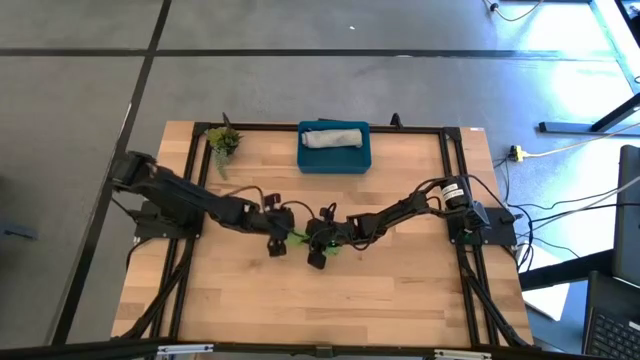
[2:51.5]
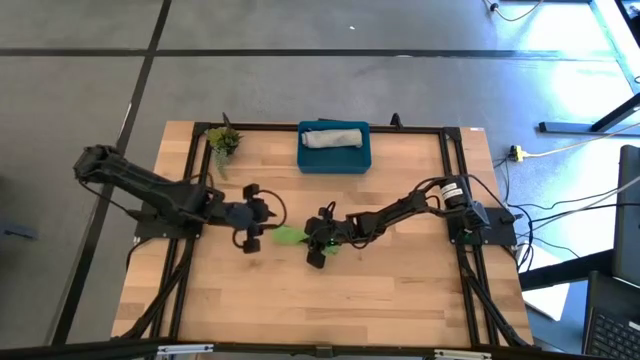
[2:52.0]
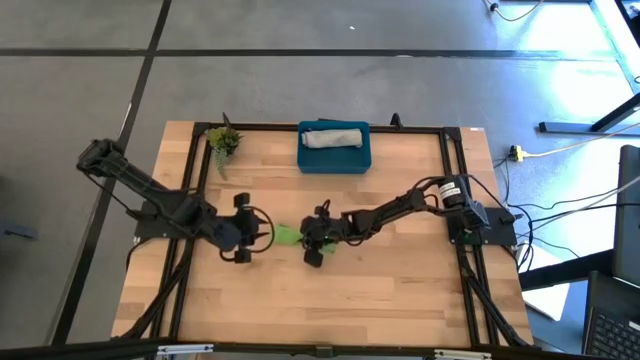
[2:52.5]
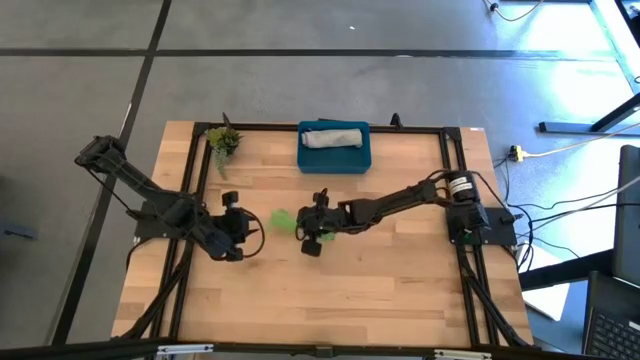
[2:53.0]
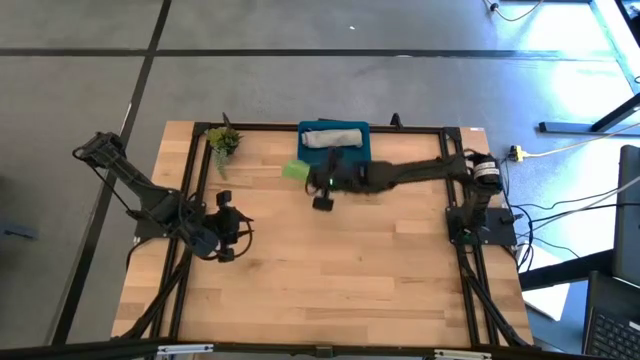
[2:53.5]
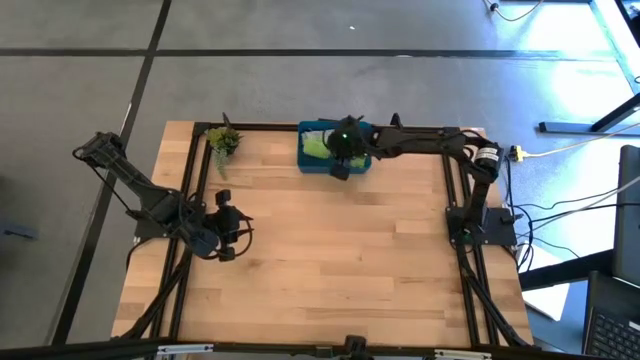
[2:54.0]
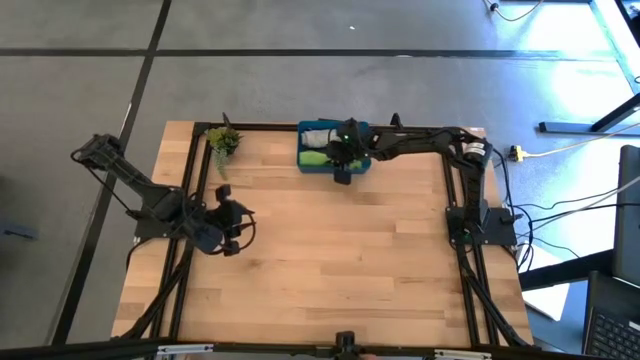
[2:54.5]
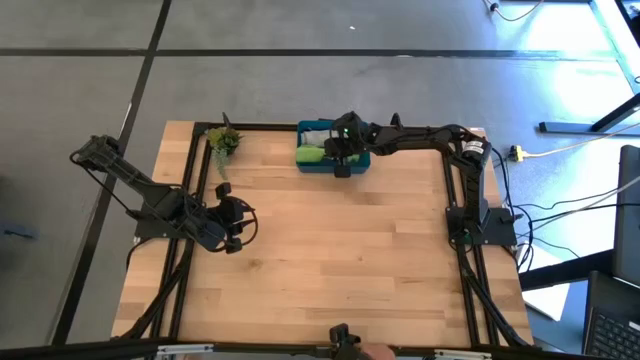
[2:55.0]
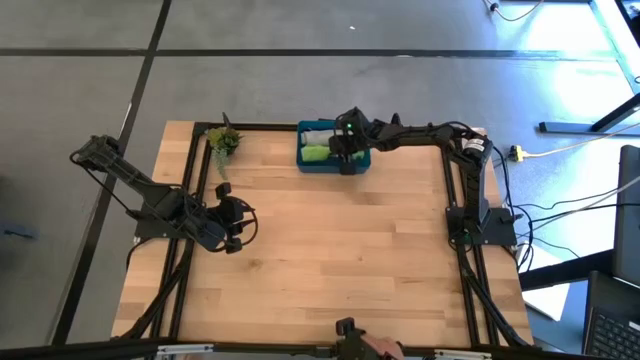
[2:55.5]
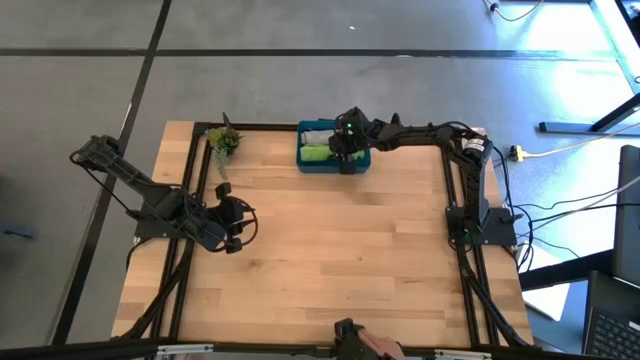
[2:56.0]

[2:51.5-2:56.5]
Task: Roll microfiber towels into tight, uniform cylinder then place into a basket
Put the green rolled microfiber cloth into the blue bin

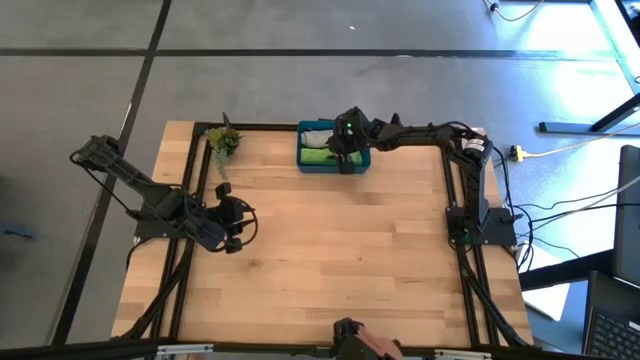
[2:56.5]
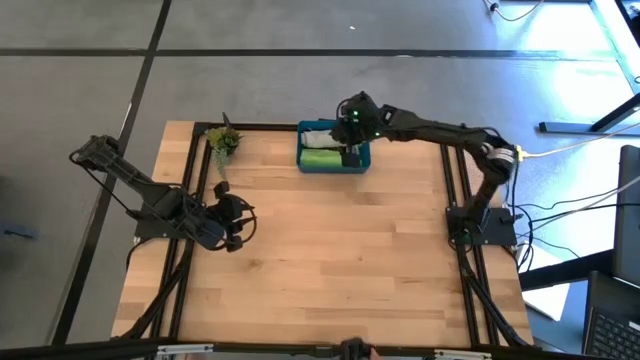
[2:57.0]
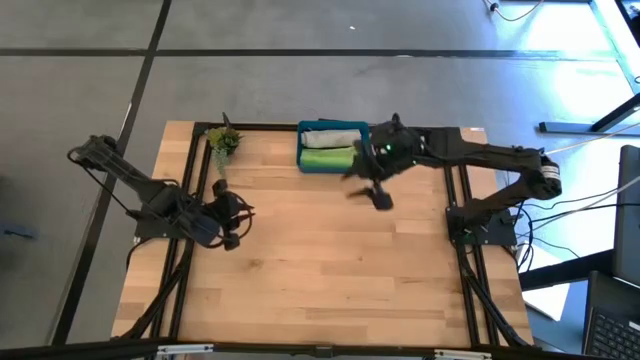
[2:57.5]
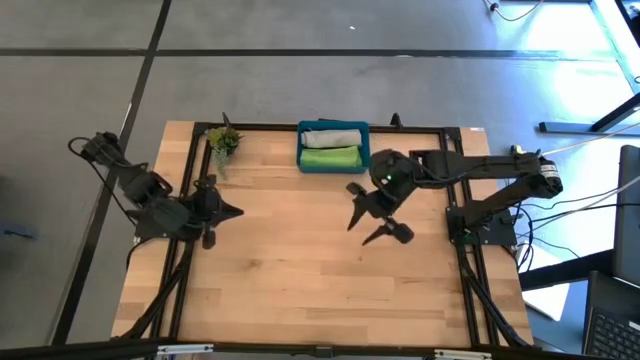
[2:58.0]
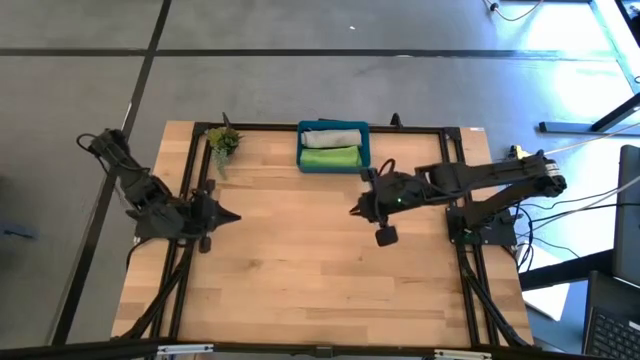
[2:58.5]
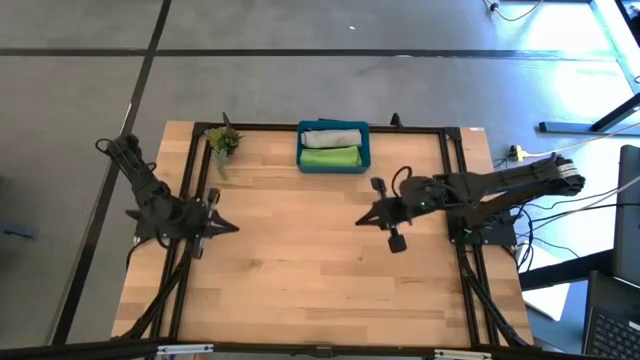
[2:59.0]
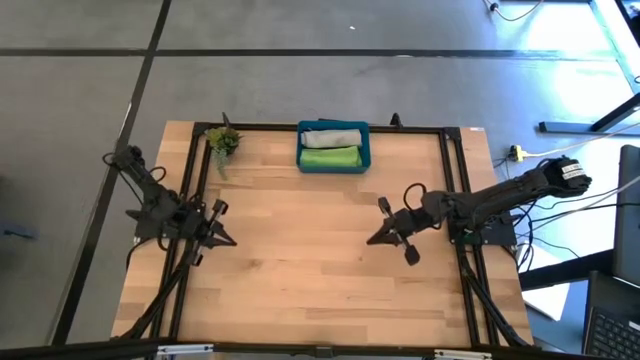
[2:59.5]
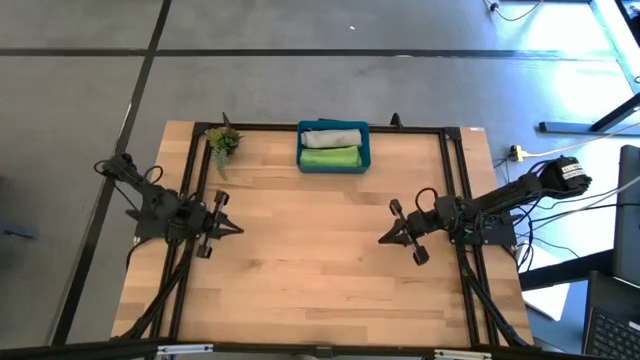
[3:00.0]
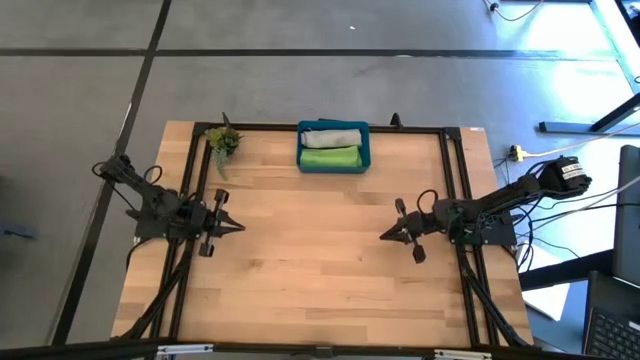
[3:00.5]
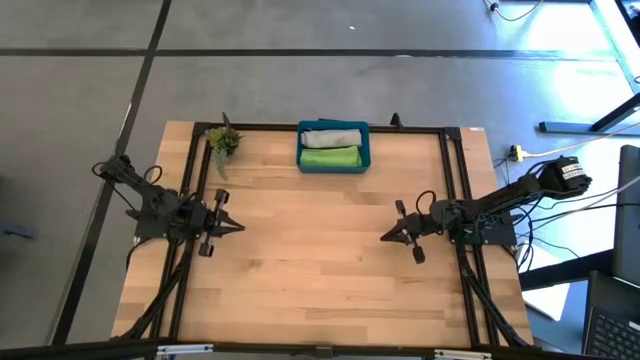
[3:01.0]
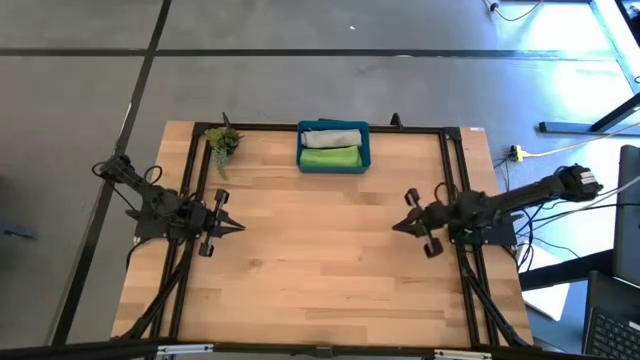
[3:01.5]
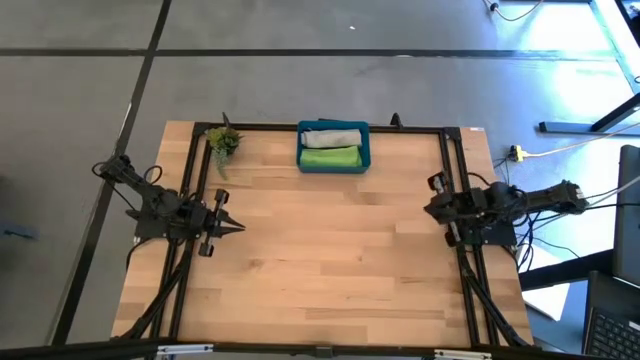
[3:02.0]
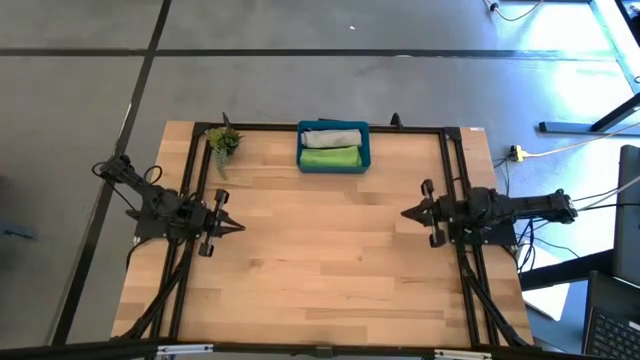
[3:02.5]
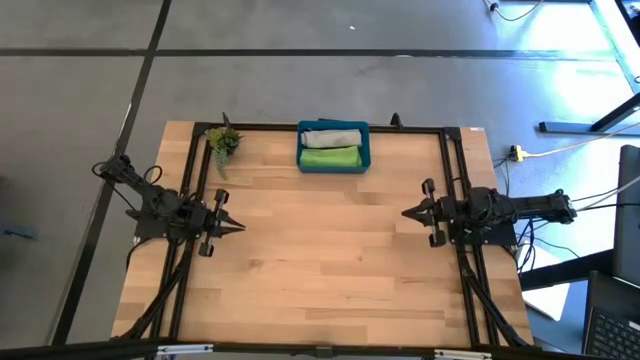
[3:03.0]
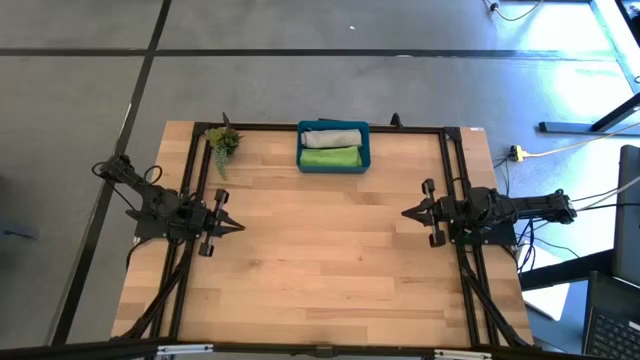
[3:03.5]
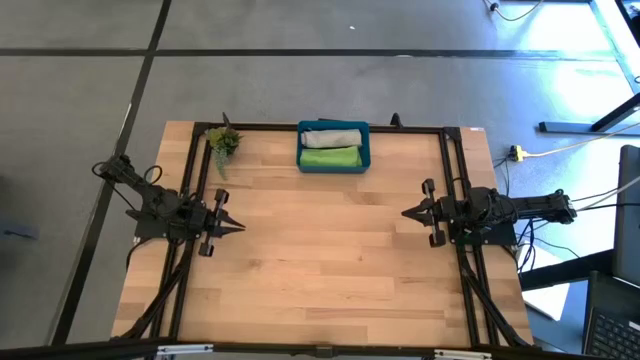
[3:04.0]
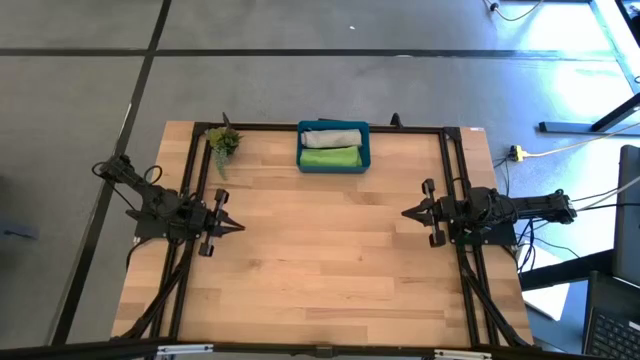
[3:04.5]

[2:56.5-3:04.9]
Return to Home Position

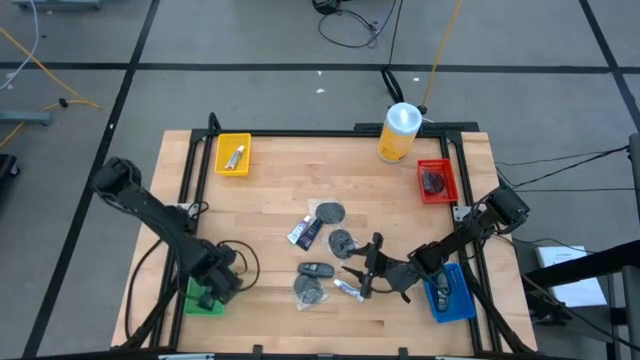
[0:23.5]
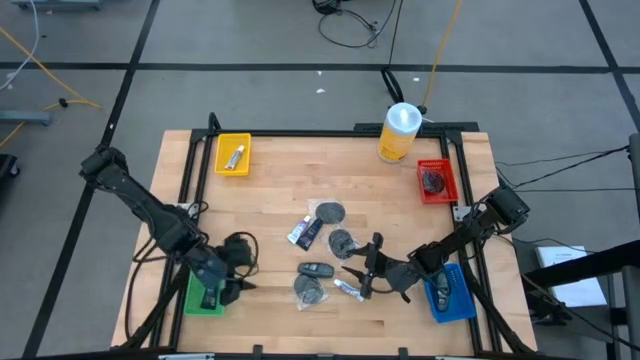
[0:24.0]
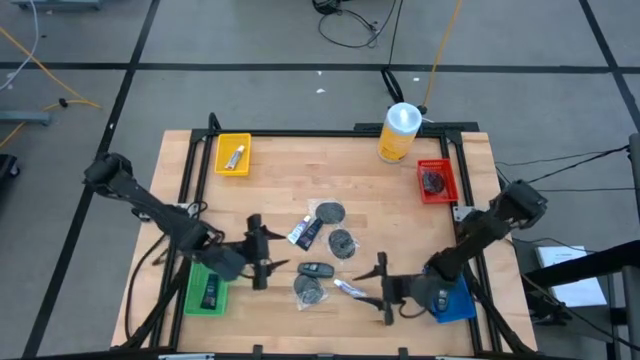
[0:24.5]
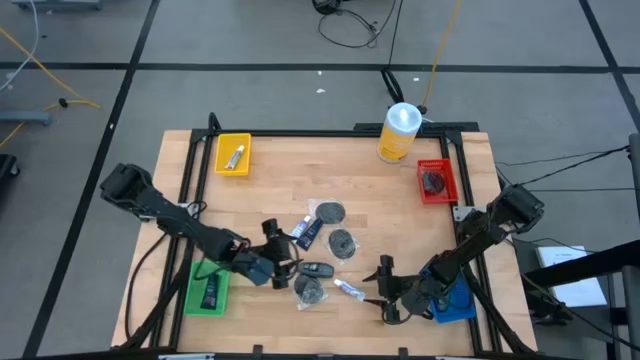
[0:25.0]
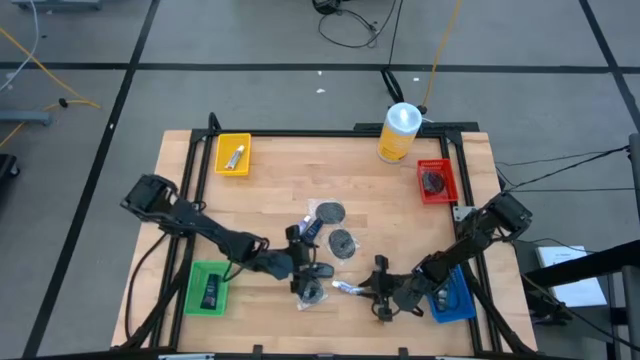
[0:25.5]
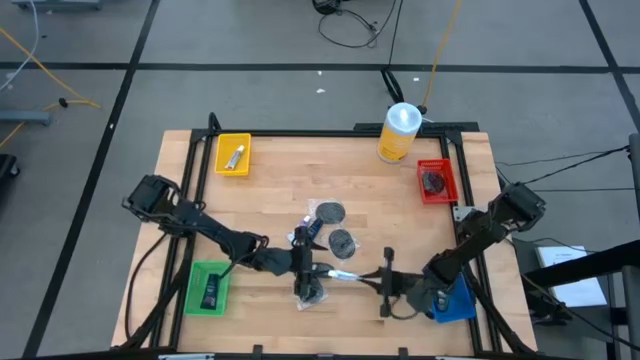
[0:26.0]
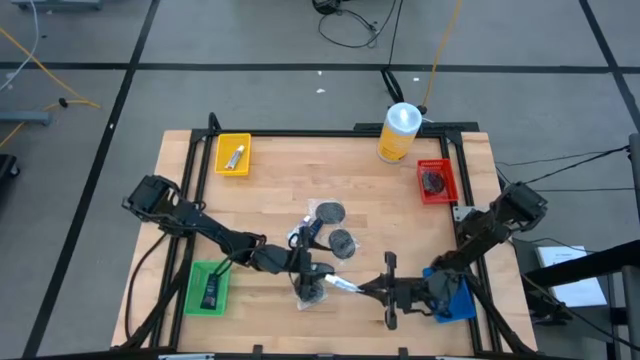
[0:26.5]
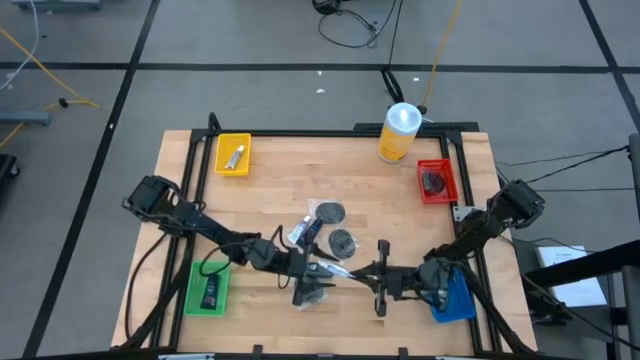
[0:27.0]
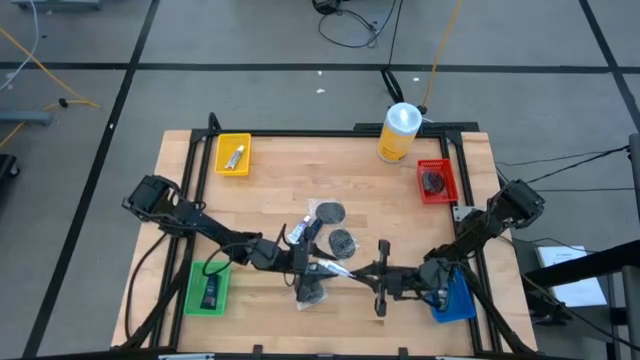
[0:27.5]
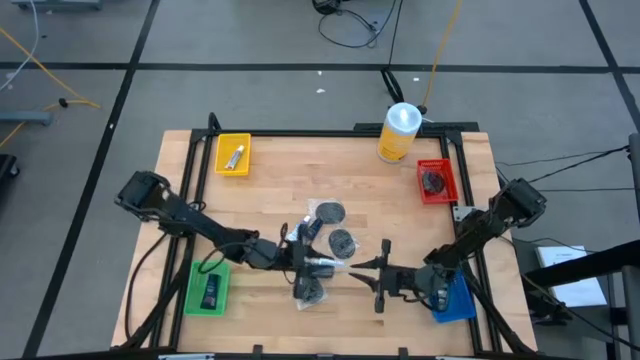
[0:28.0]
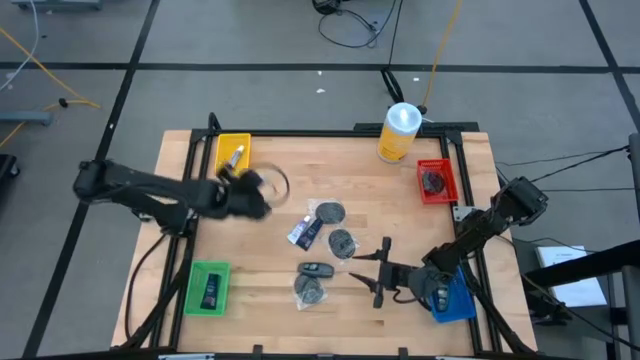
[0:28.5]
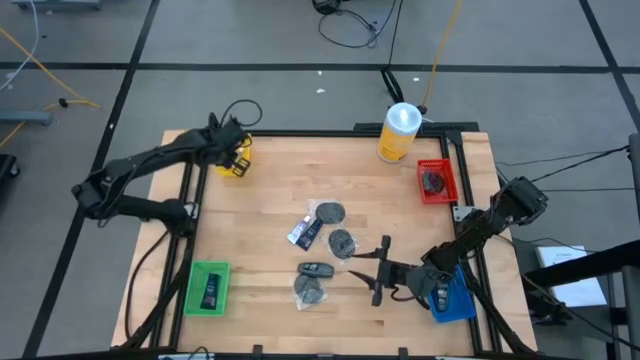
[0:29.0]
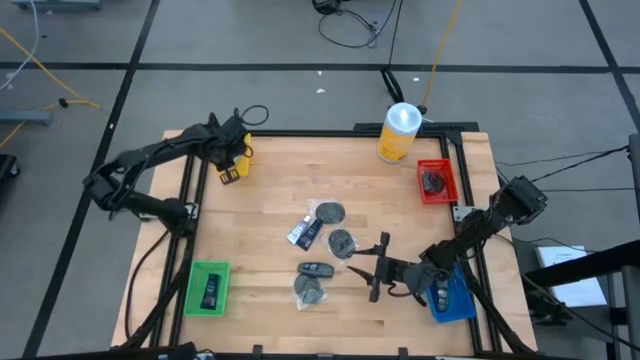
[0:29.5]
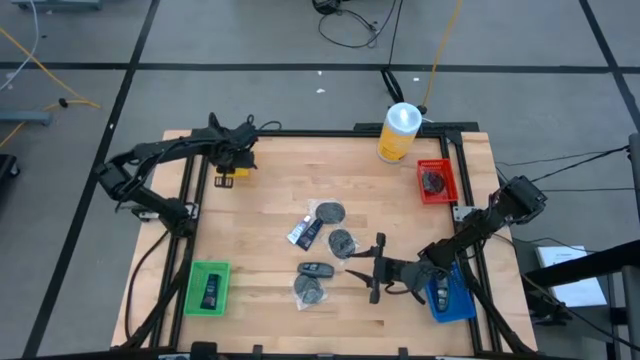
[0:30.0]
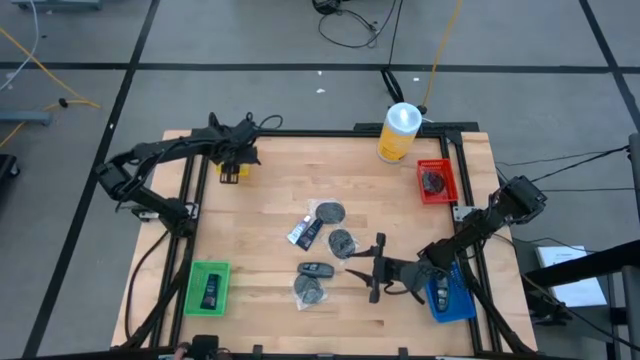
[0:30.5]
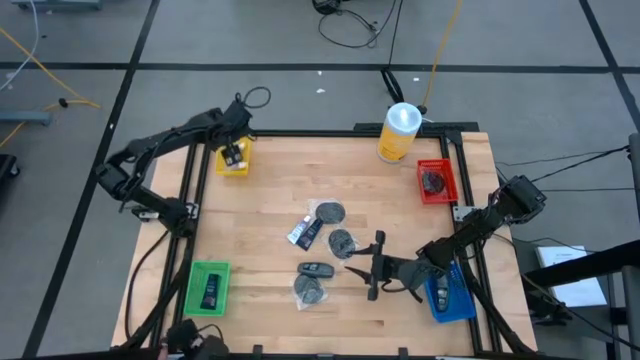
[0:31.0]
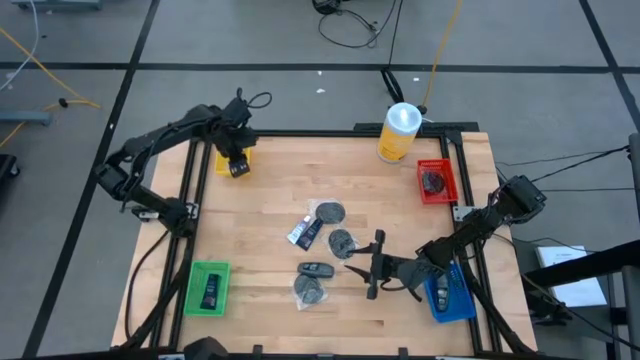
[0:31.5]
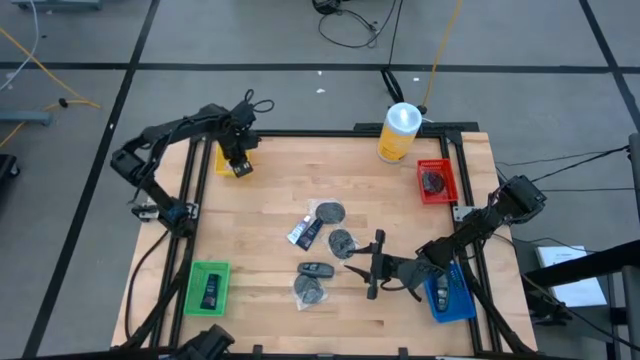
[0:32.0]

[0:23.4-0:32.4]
Task: Pick & Place Travel size toiletries
Put the white toothpaste into the yellow bin
